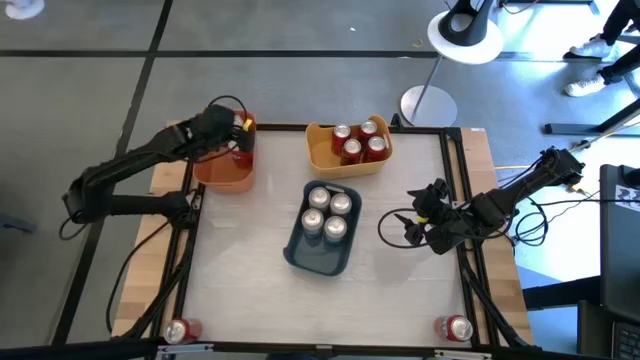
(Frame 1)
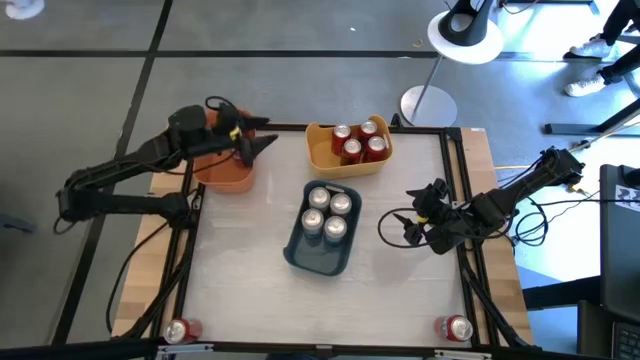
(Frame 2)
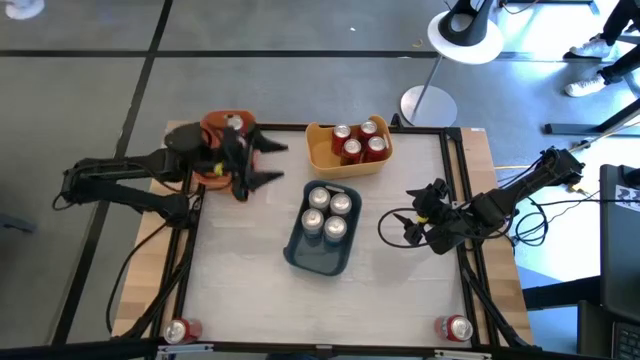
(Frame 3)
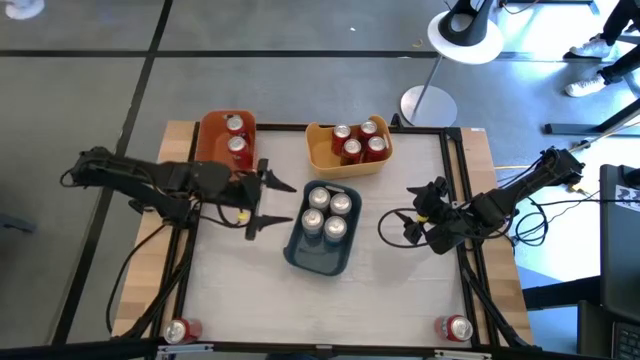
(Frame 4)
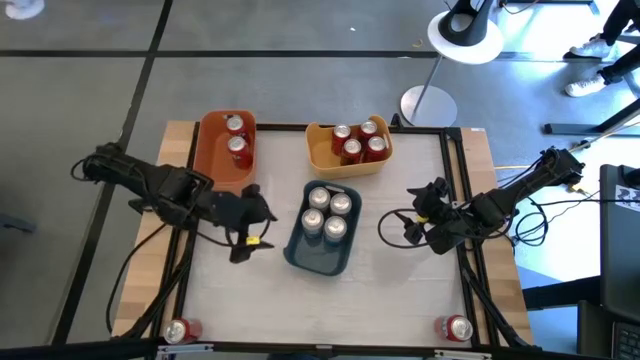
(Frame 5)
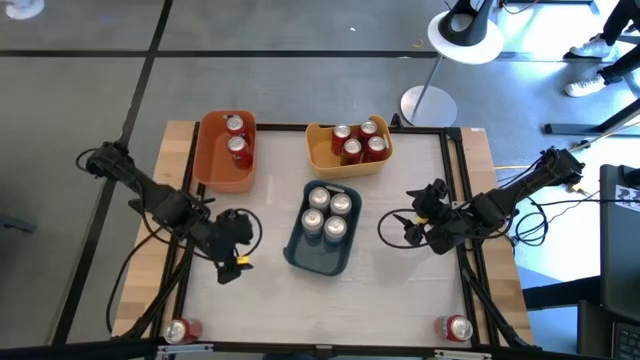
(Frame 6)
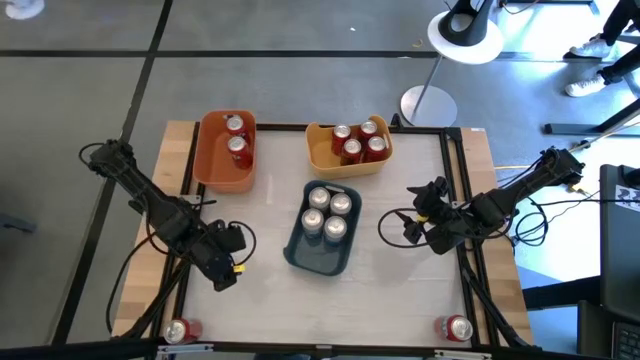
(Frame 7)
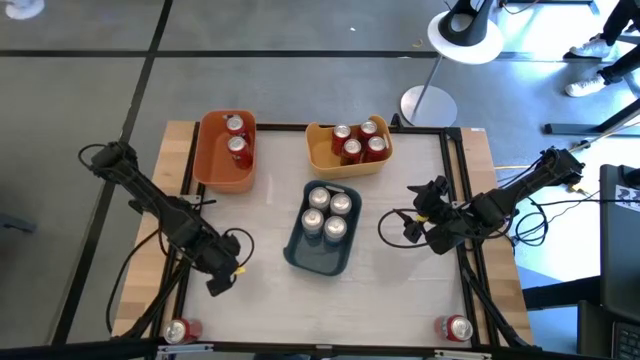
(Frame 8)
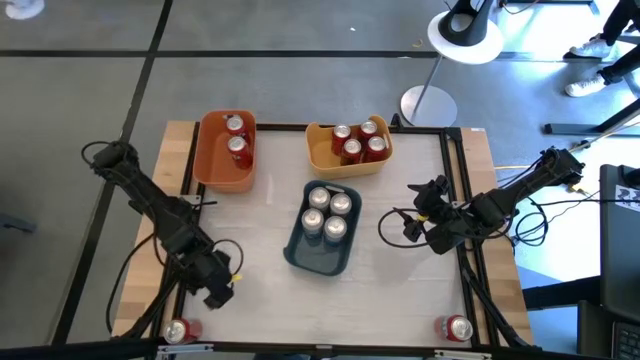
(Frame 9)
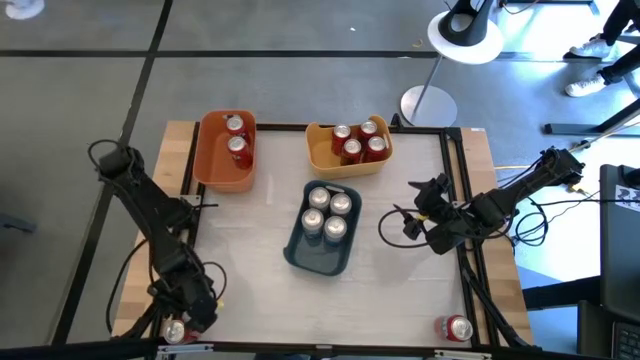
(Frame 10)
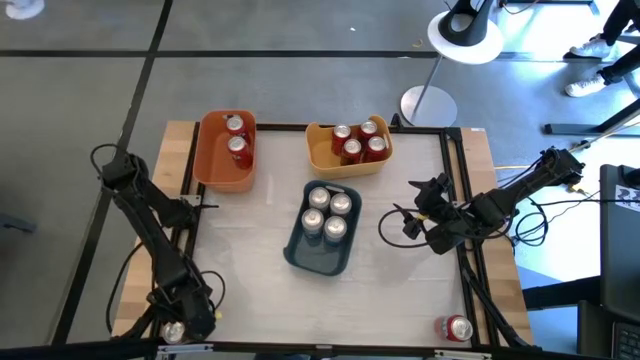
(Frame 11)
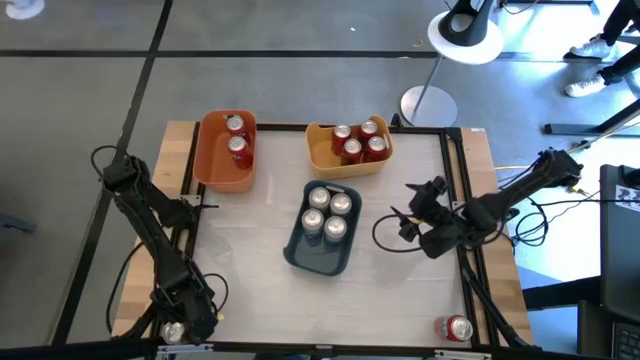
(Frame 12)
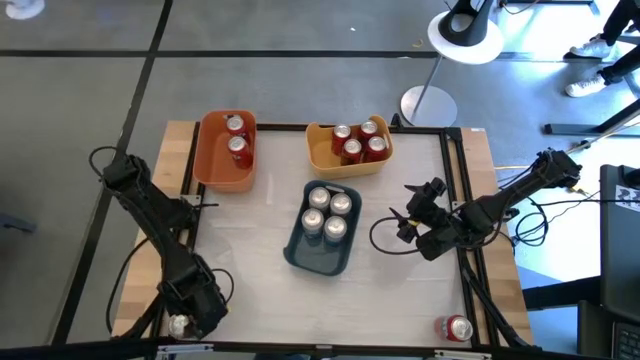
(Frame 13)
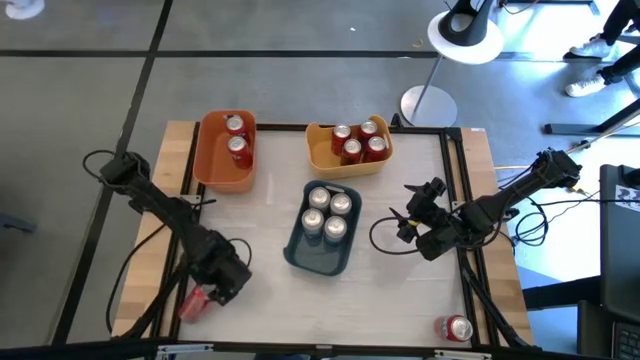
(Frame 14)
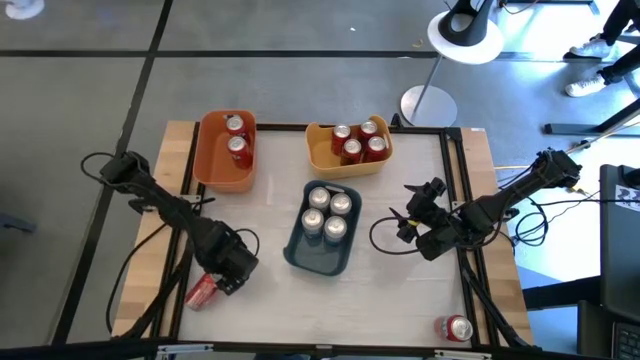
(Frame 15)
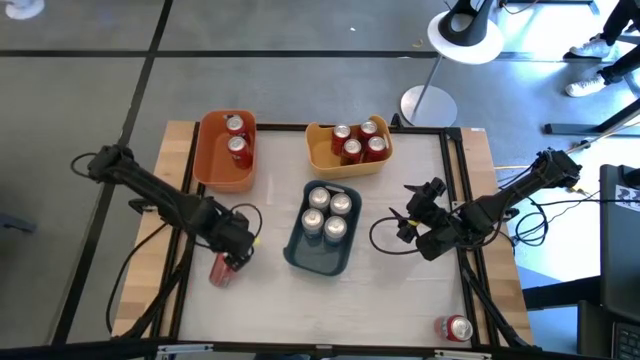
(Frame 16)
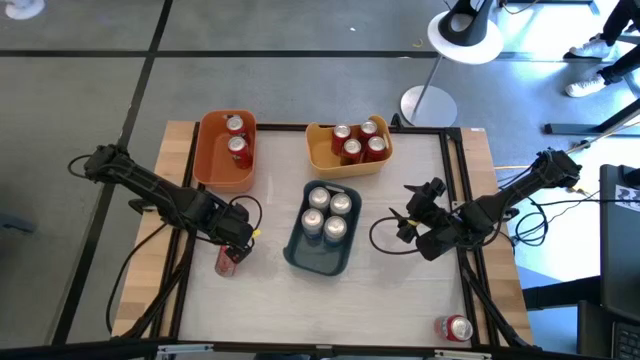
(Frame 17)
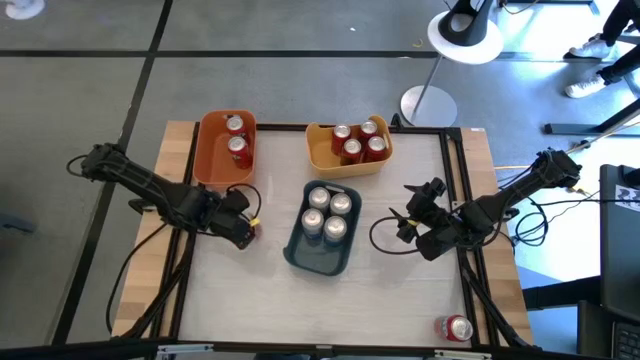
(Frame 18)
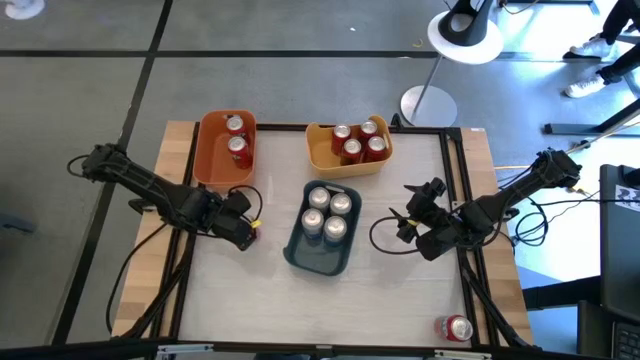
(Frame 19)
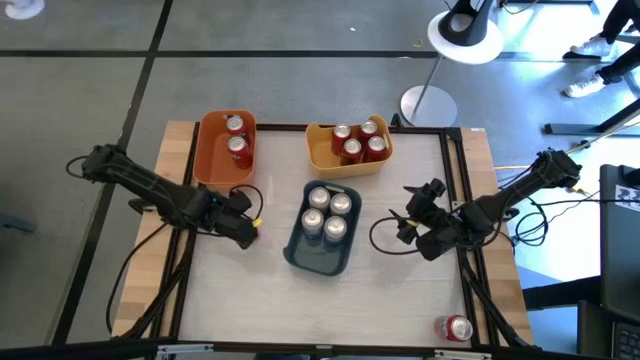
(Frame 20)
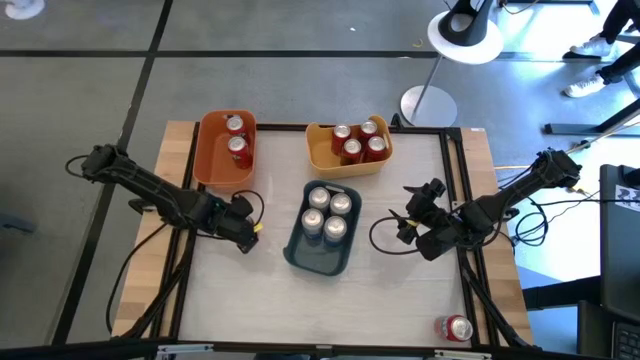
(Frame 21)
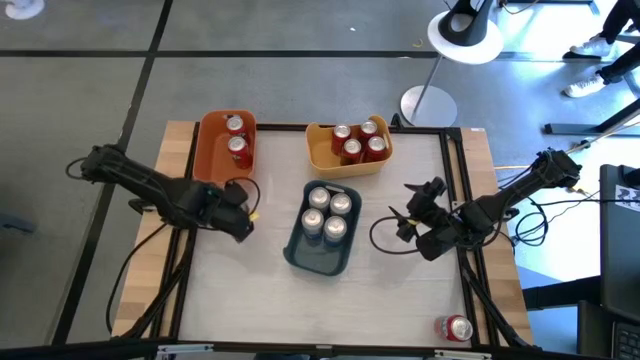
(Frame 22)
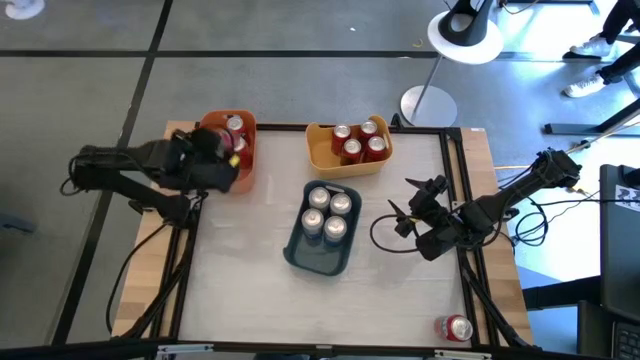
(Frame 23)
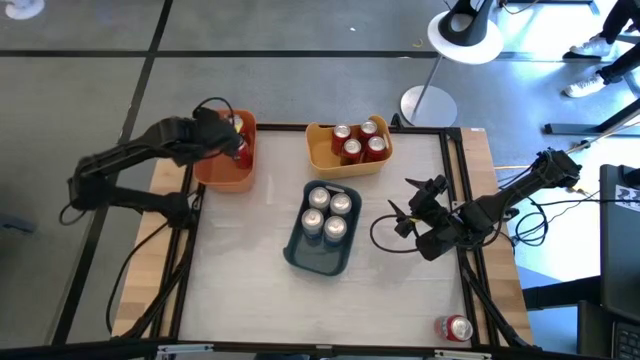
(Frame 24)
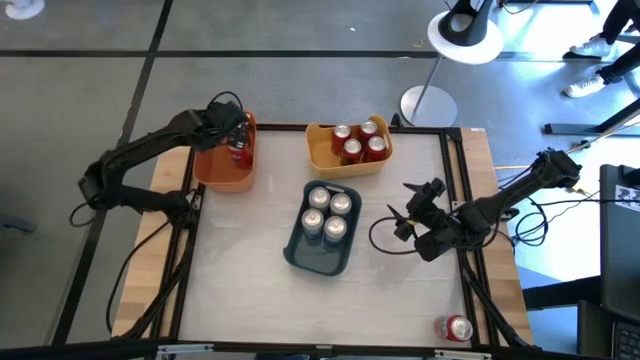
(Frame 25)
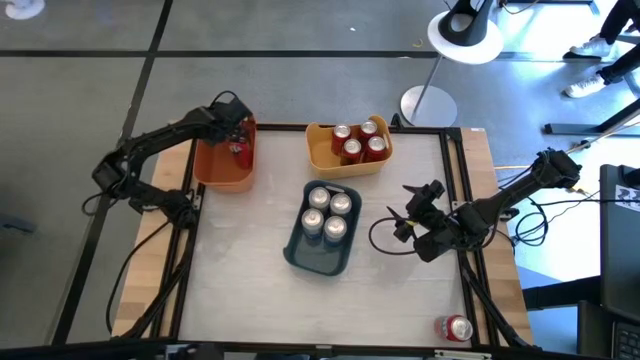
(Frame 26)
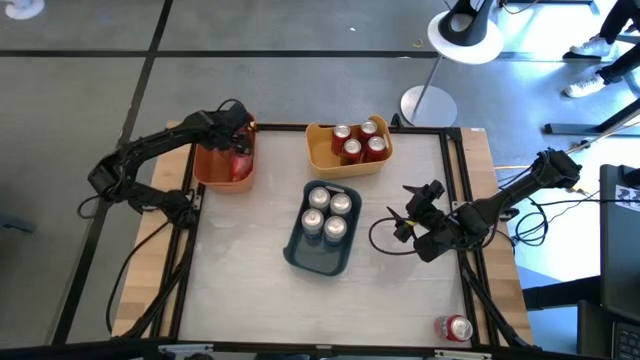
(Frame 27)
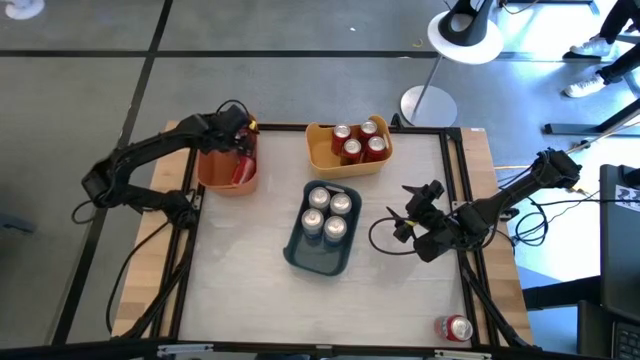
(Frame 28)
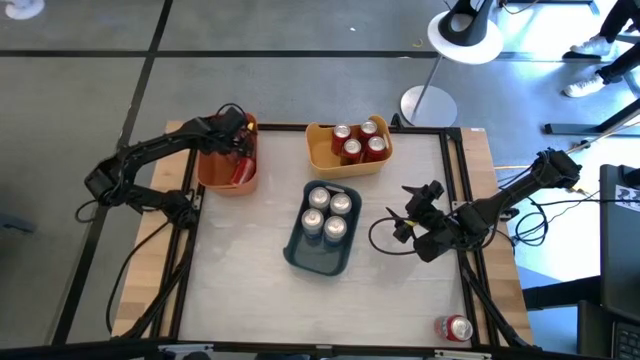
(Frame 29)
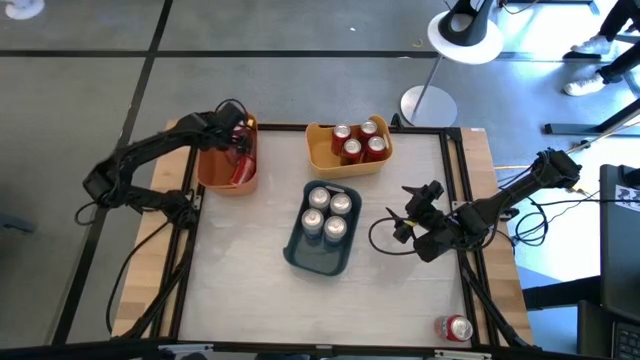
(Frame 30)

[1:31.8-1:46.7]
Task: Sort soda cans
Put the left orange soda can into the orange bin

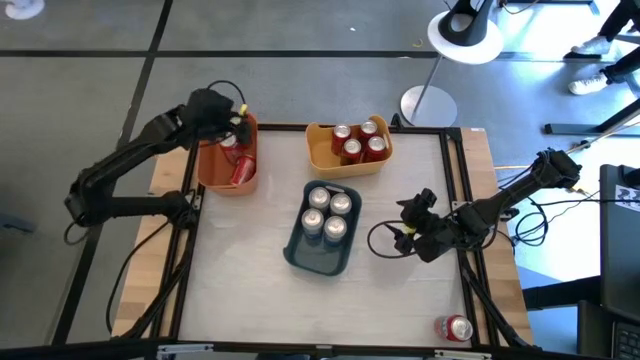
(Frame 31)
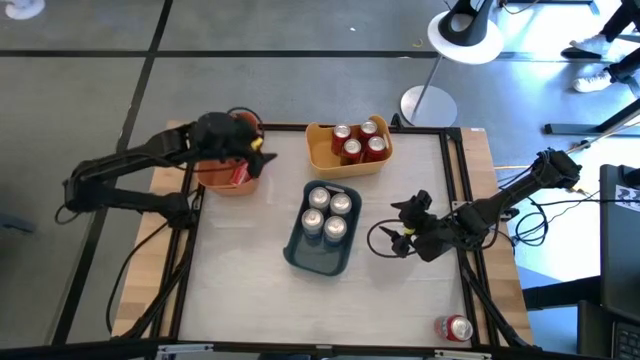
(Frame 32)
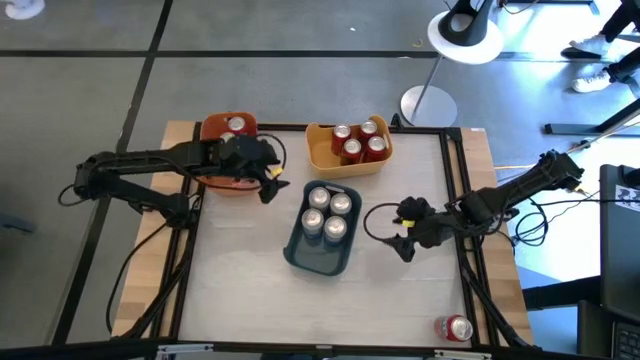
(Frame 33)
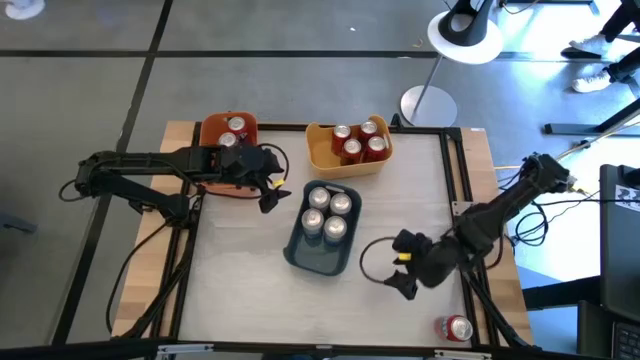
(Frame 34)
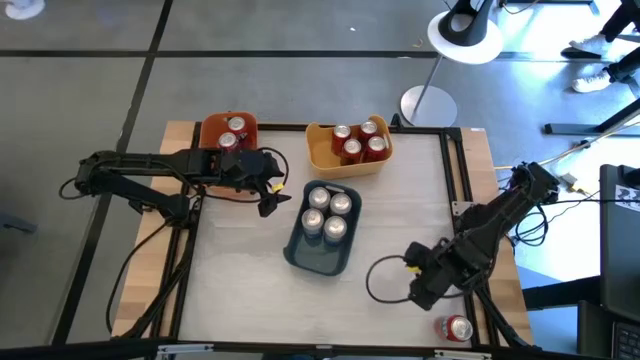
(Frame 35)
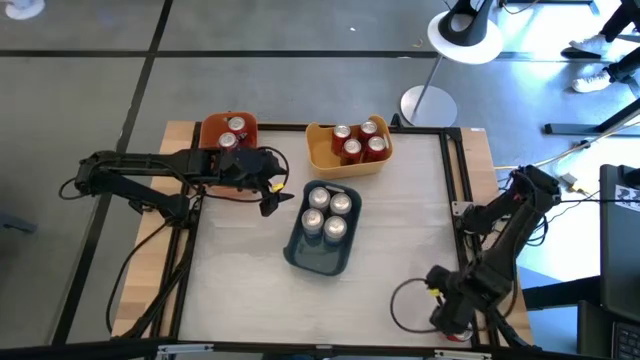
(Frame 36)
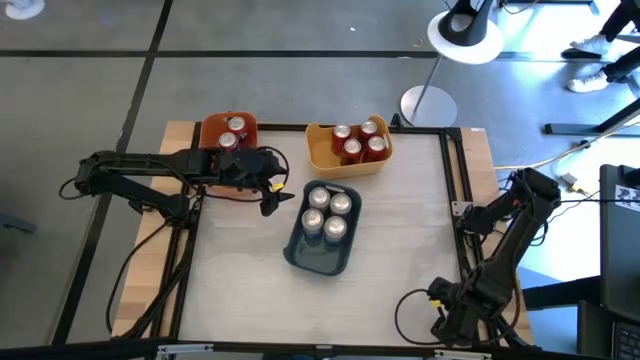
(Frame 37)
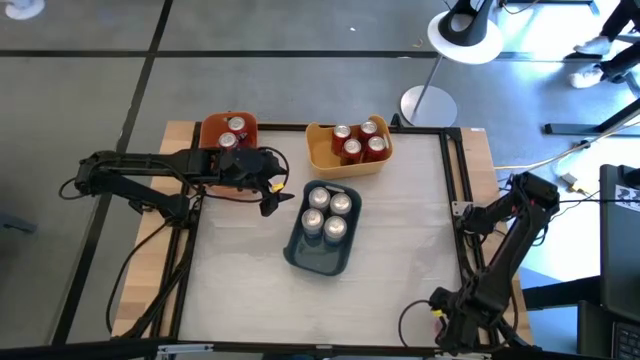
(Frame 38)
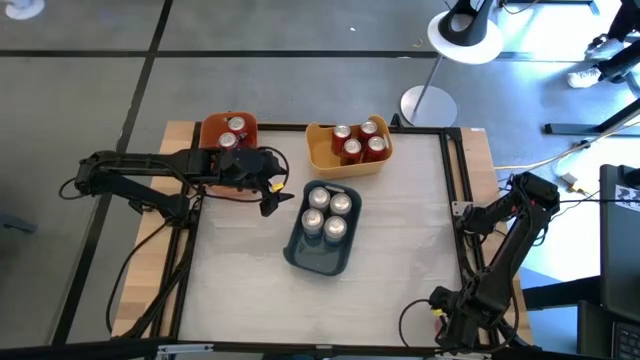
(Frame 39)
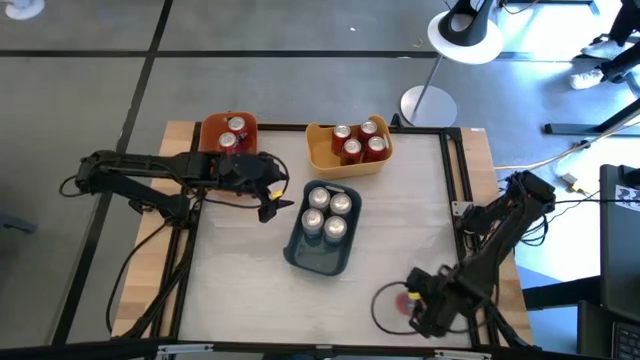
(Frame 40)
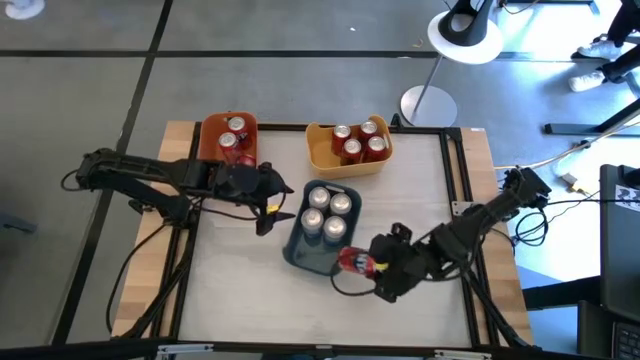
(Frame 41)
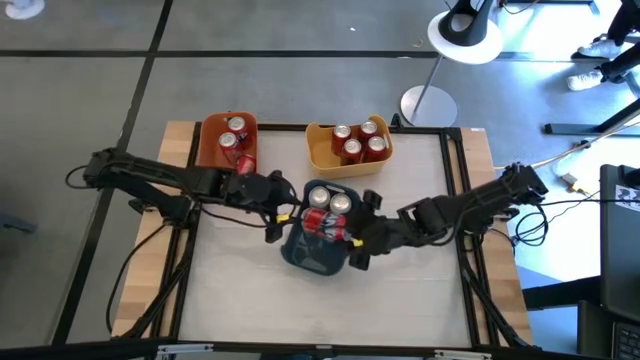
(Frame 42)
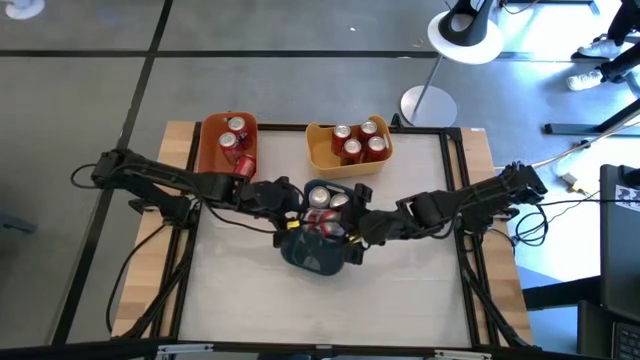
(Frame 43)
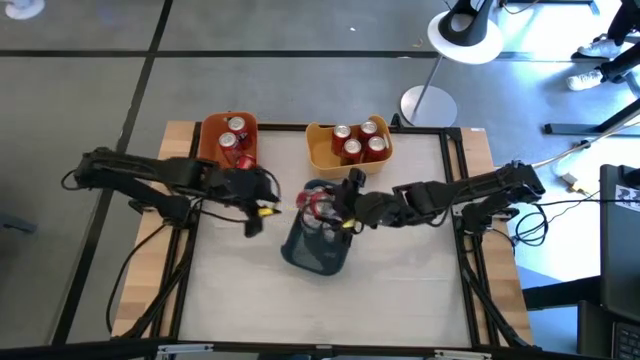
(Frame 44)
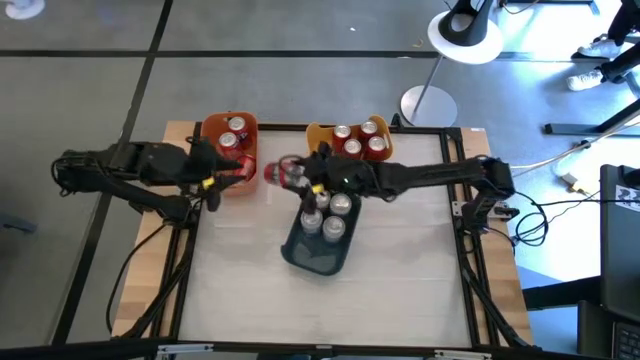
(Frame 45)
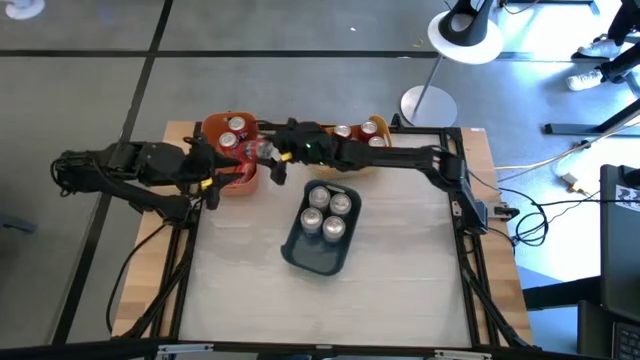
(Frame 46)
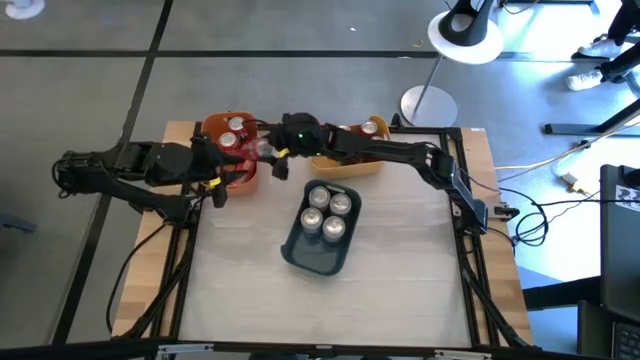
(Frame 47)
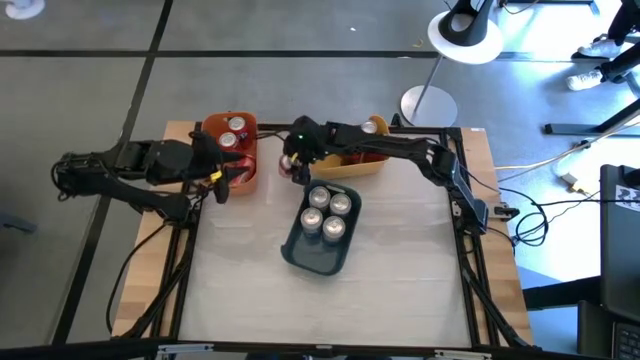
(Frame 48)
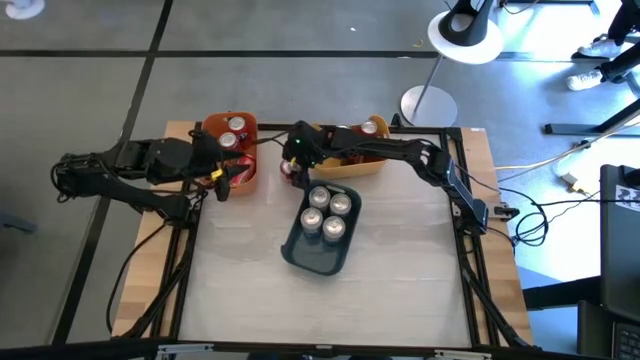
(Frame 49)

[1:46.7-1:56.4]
Move the orange soda can to the top left of the table
